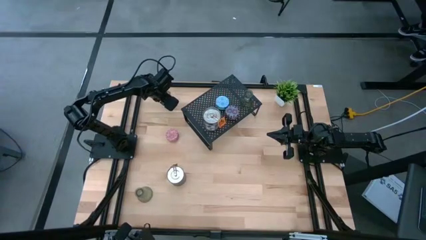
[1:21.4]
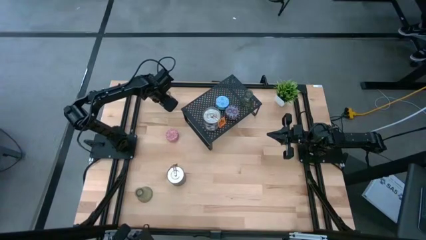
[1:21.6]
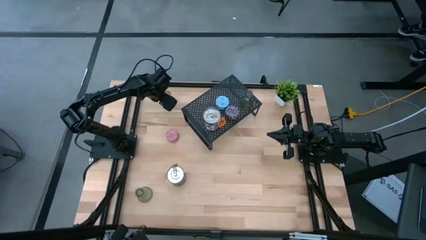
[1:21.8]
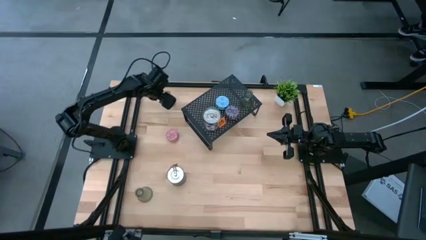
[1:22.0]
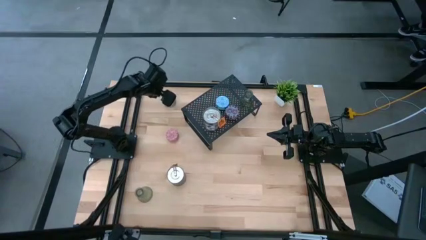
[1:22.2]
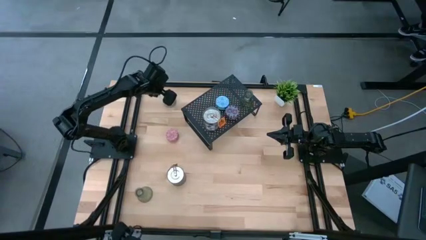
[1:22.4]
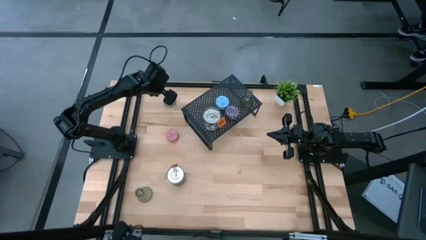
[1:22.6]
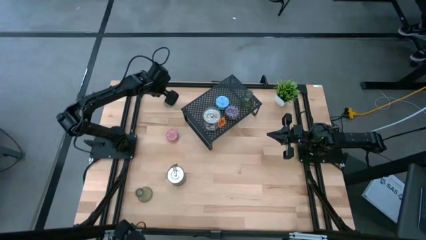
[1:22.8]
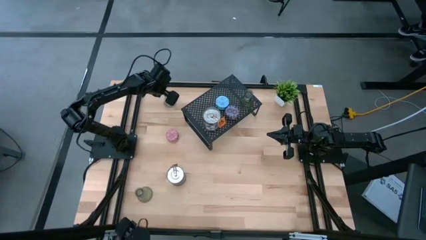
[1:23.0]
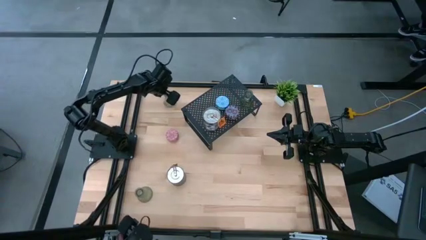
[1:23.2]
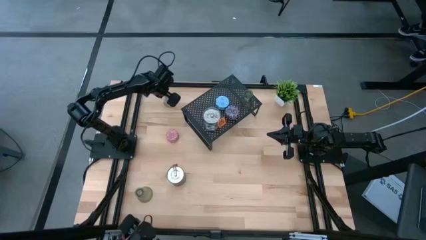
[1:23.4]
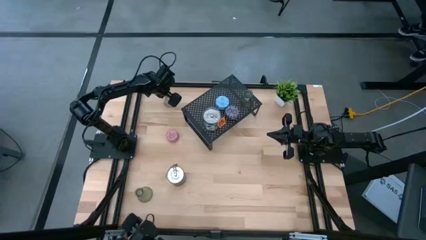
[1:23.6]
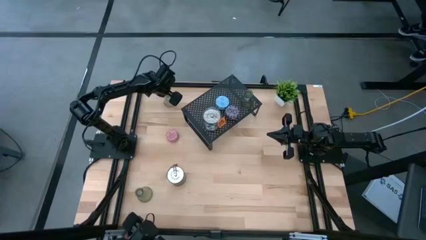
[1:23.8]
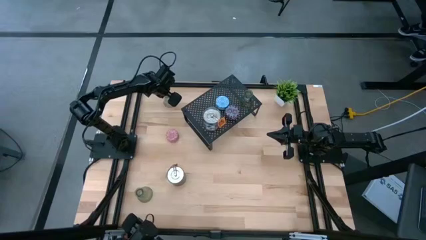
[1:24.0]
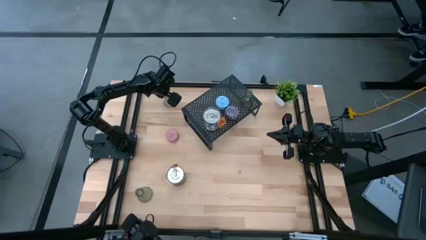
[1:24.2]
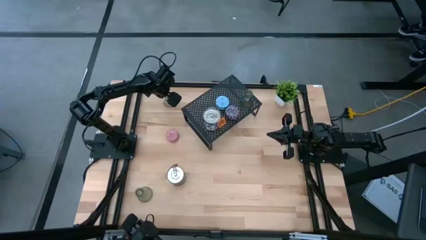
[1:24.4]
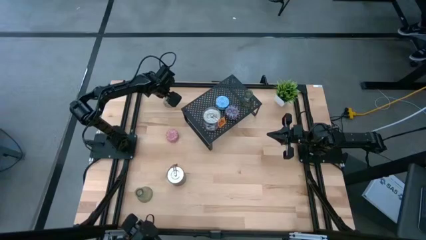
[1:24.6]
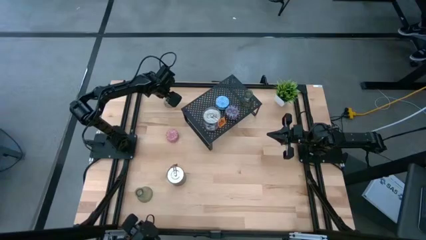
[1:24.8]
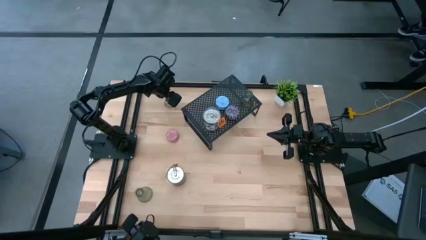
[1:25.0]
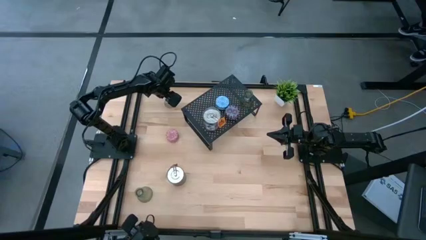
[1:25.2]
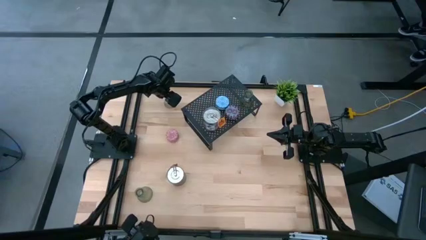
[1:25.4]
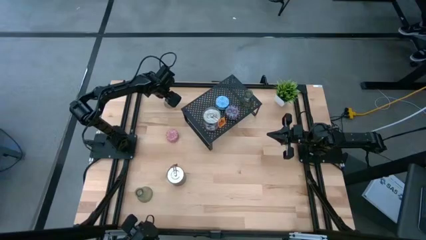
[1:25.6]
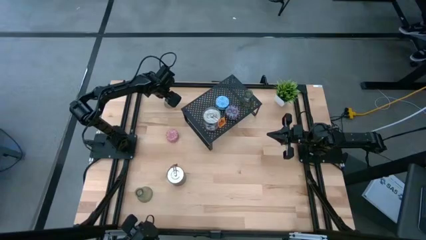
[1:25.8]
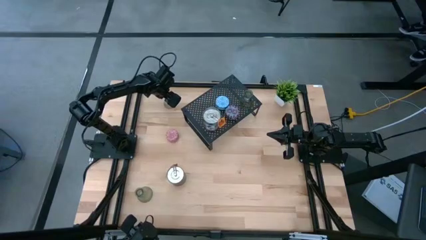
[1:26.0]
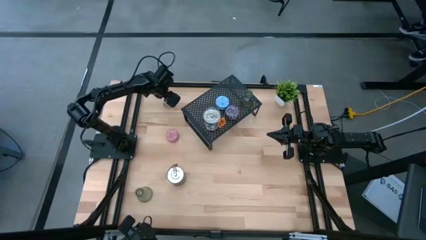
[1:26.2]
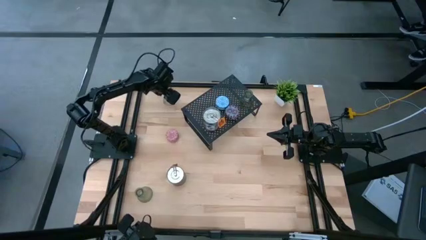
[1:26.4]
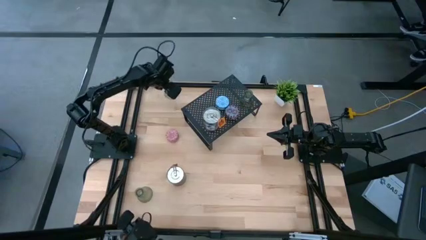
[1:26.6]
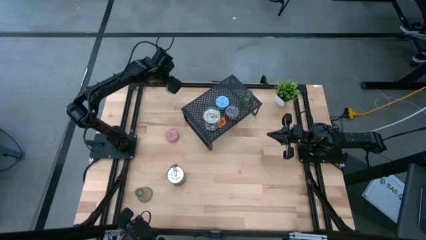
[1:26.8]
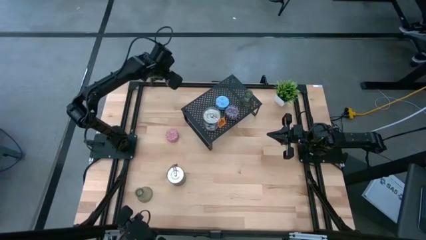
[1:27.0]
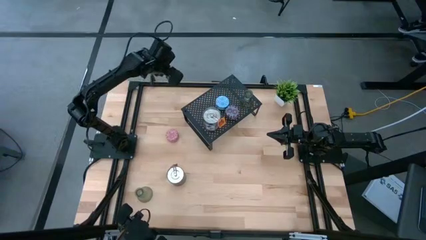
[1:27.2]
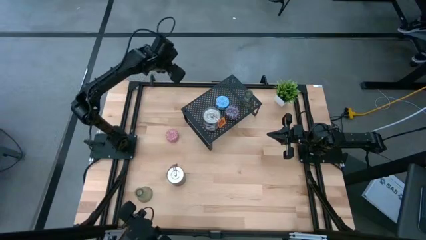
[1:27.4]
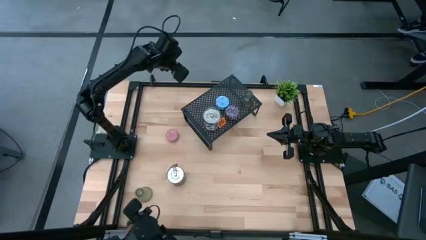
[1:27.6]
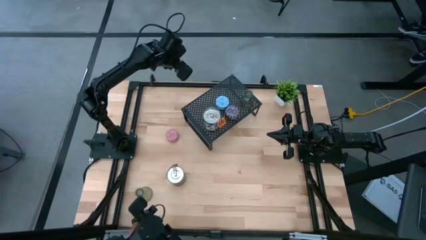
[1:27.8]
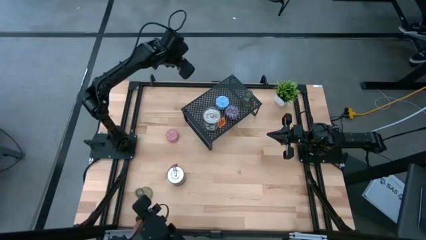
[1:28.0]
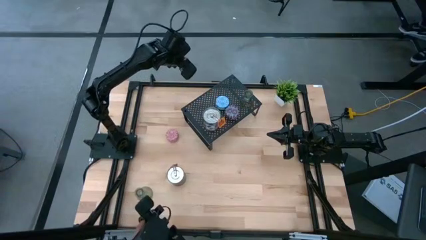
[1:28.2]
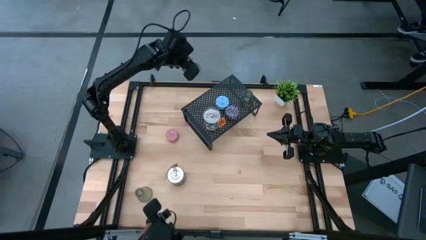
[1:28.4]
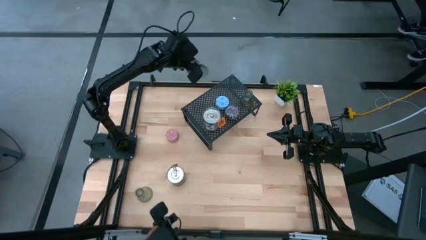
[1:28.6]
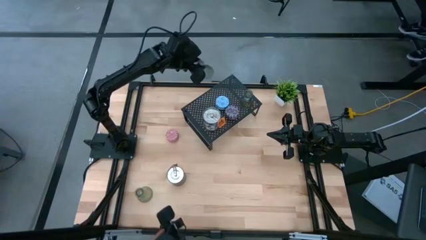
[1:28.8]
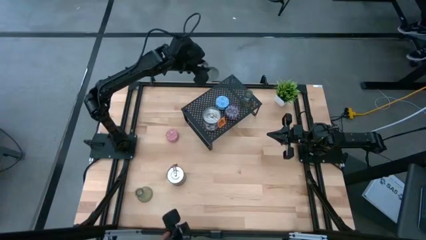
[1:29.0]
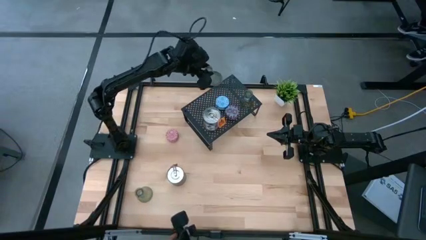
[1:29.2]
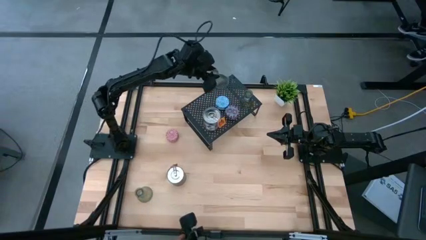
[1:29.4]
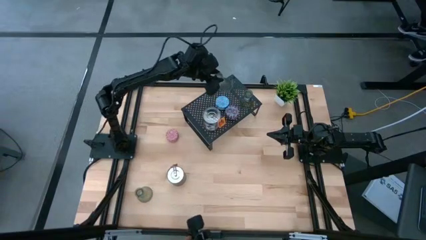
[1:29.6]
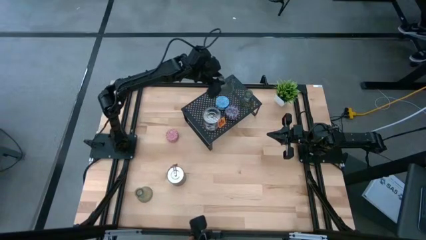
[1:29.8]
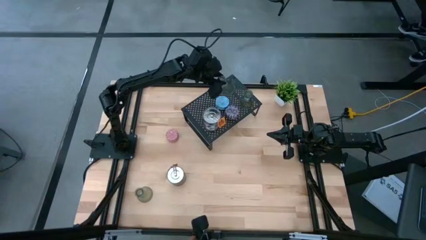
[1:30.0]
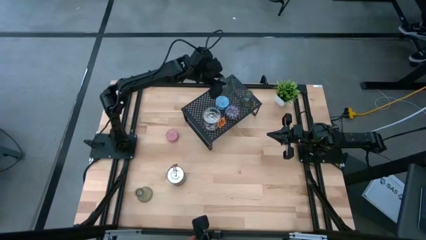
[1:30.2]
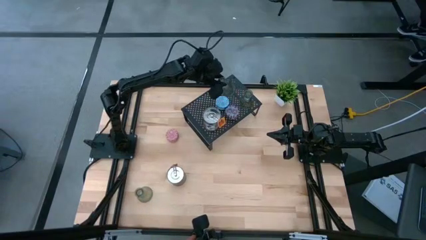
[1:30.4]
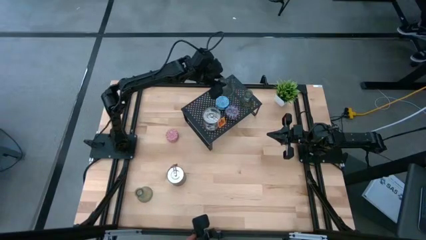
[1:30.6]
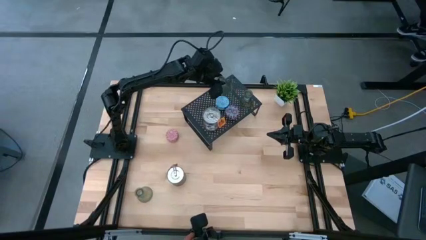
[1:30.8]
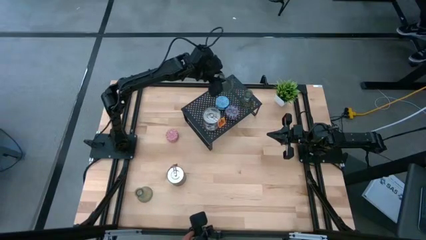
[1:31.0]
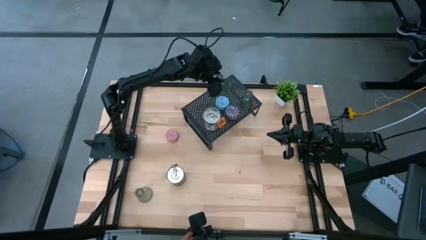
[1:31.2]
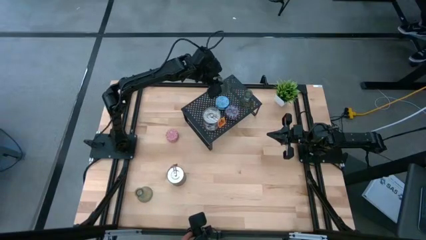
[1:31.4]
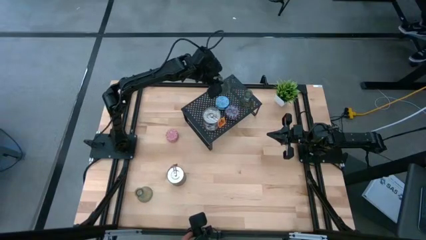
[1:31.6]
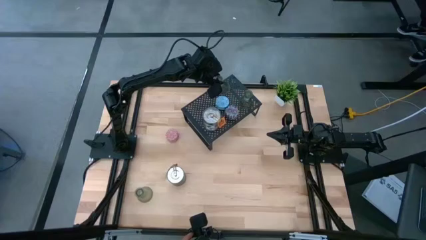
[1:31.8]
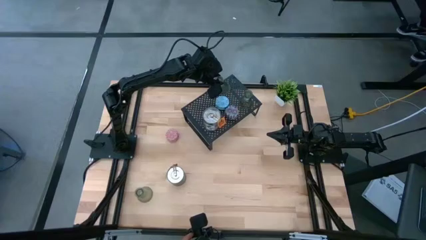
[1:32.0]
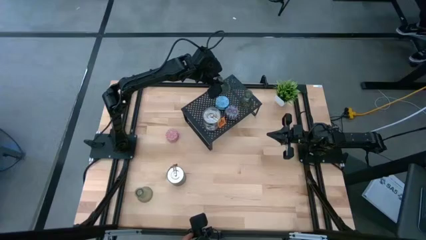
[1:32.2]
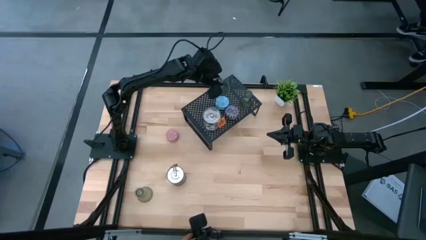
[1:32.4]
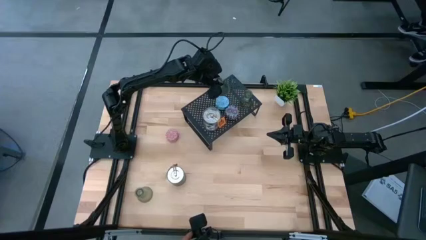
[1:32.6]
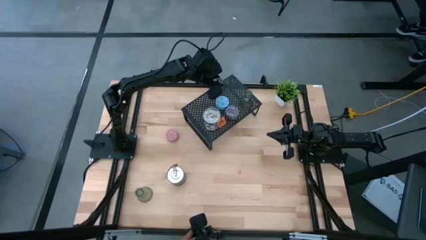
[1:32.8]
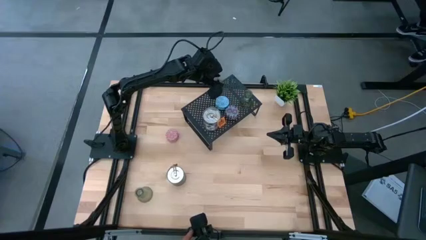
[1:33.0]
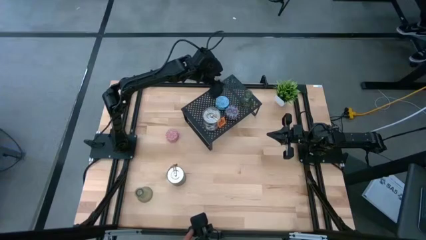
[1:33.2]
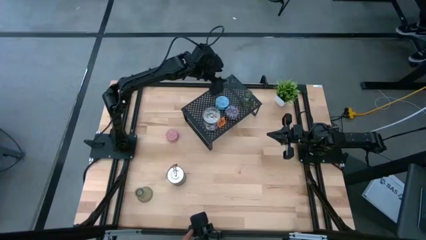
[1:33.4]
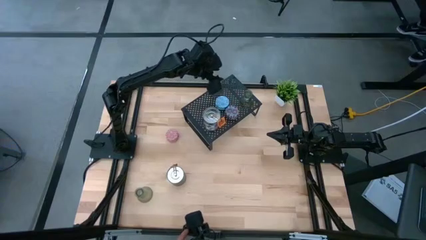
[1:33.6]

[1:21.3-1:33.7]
Task: Pick & Place candle stick holders
Put the top green glass candle holder on the shelf aligned with the green glass candle holder
